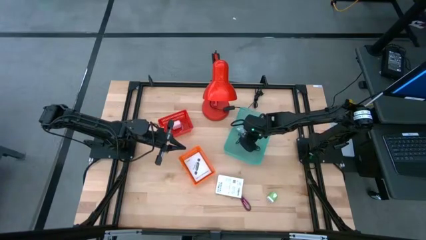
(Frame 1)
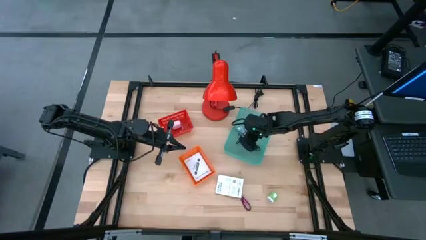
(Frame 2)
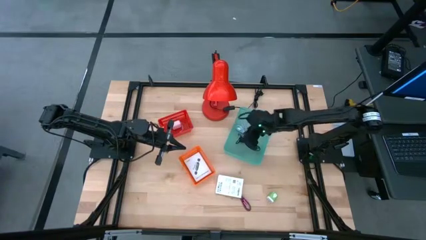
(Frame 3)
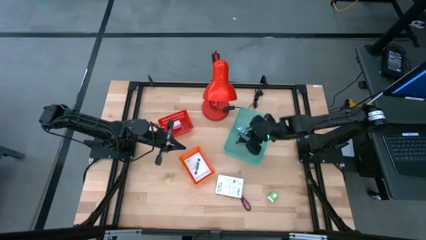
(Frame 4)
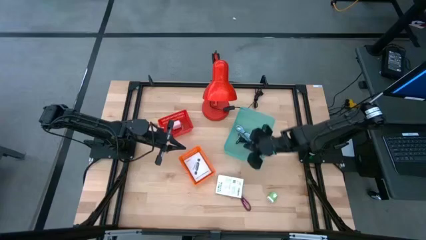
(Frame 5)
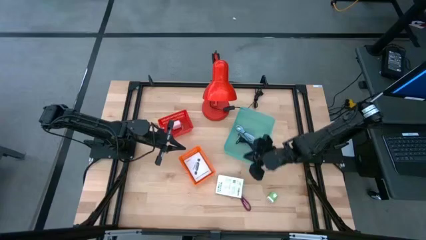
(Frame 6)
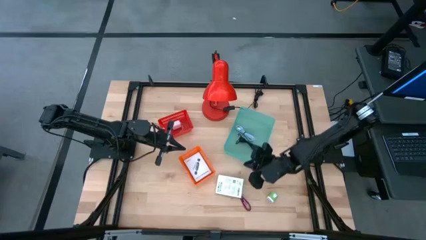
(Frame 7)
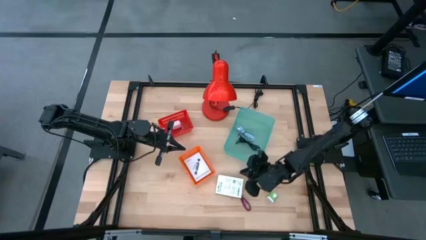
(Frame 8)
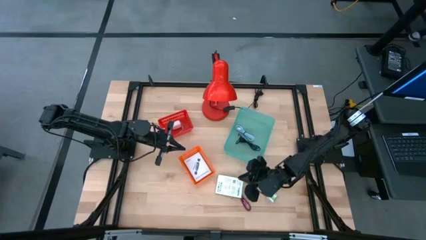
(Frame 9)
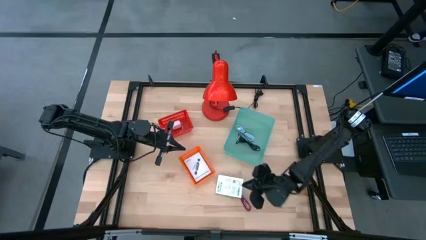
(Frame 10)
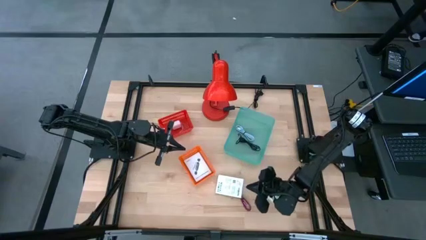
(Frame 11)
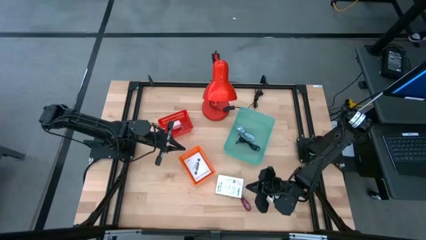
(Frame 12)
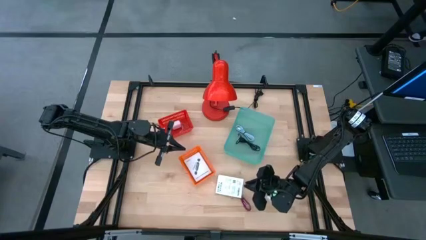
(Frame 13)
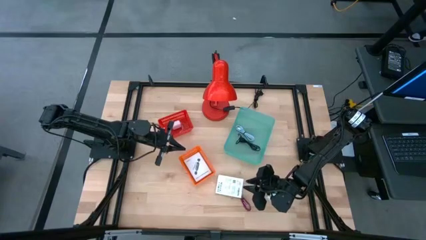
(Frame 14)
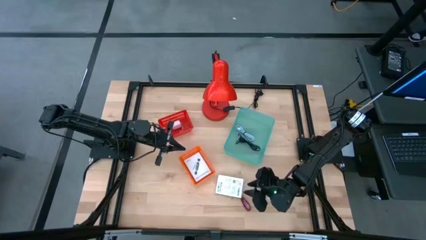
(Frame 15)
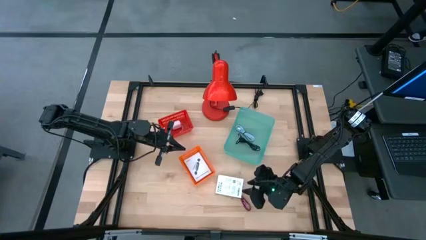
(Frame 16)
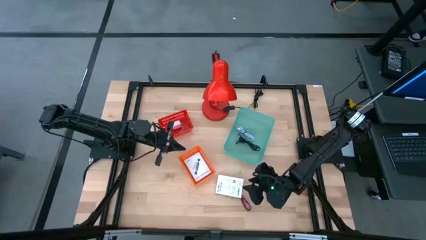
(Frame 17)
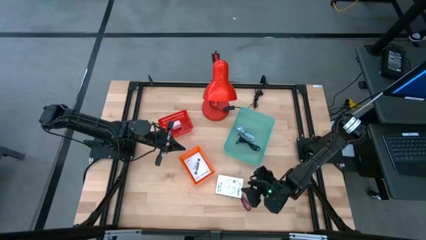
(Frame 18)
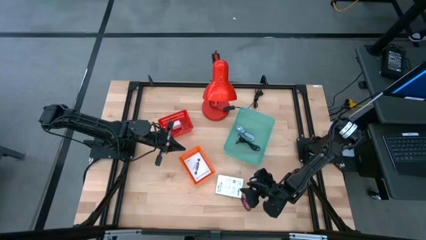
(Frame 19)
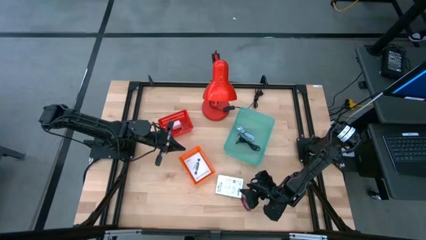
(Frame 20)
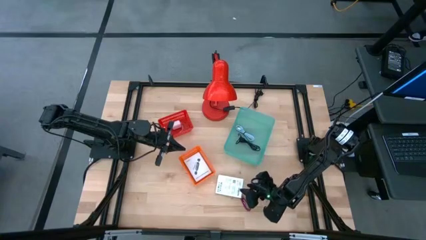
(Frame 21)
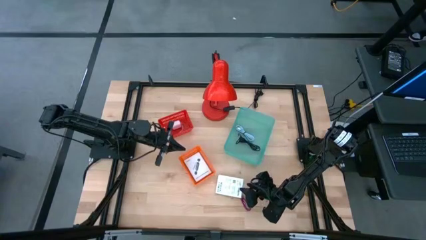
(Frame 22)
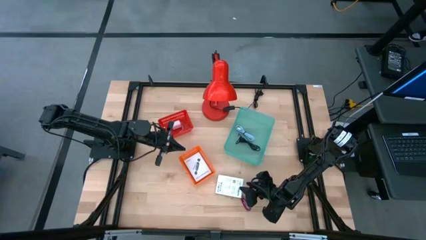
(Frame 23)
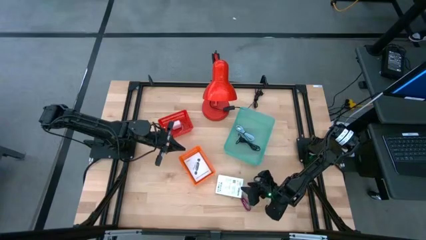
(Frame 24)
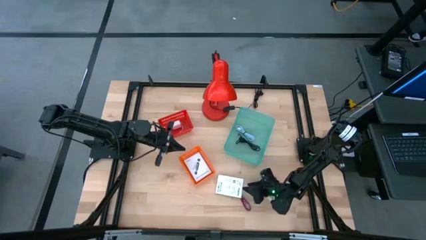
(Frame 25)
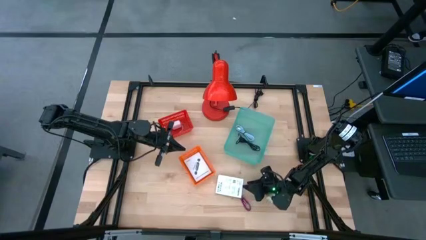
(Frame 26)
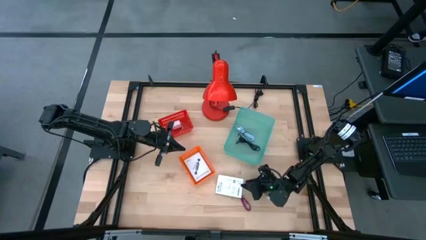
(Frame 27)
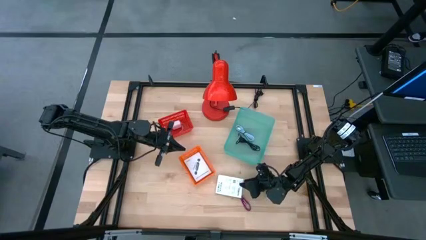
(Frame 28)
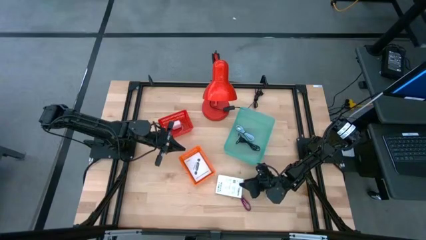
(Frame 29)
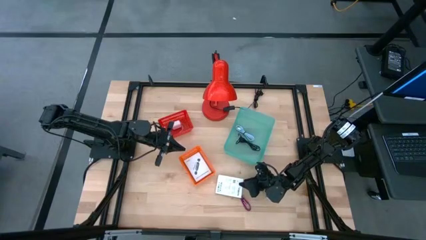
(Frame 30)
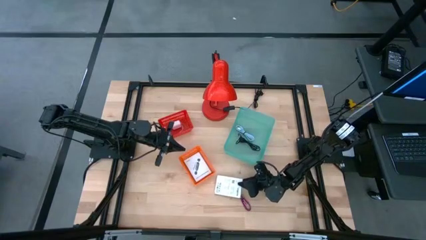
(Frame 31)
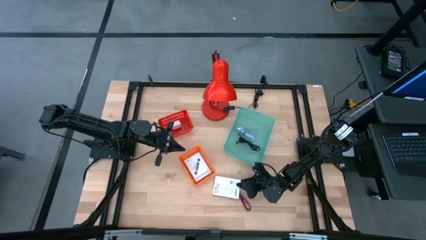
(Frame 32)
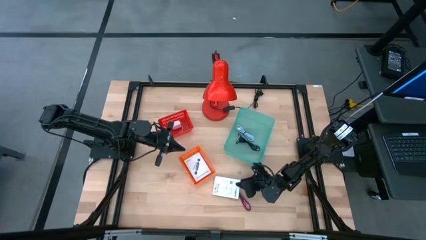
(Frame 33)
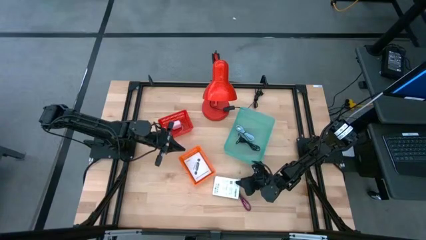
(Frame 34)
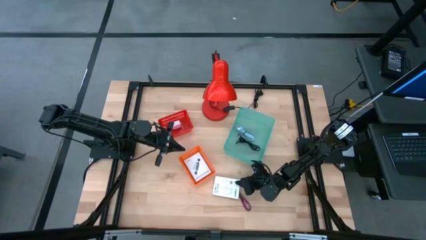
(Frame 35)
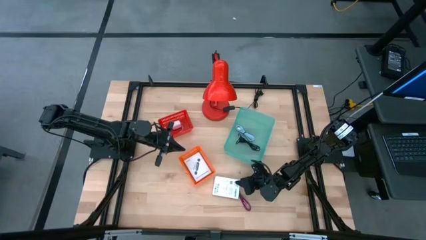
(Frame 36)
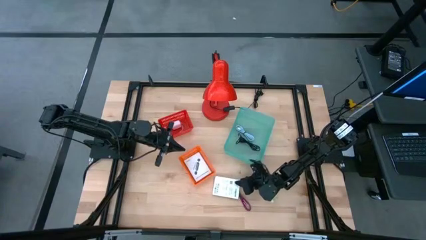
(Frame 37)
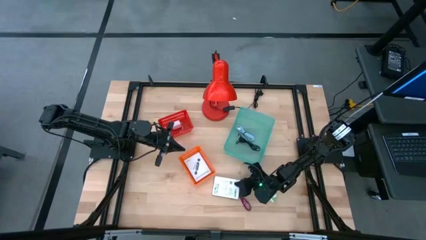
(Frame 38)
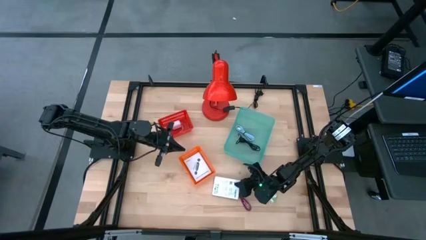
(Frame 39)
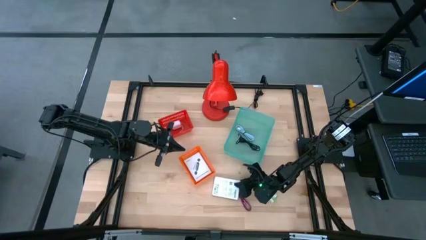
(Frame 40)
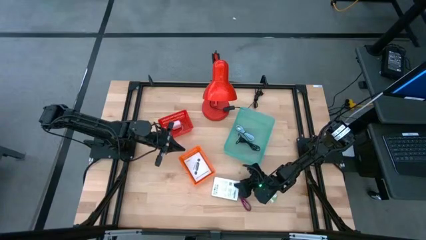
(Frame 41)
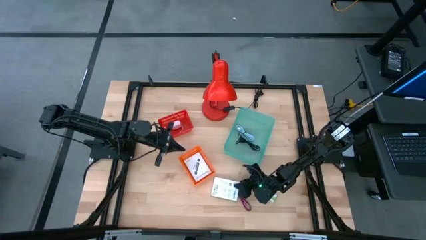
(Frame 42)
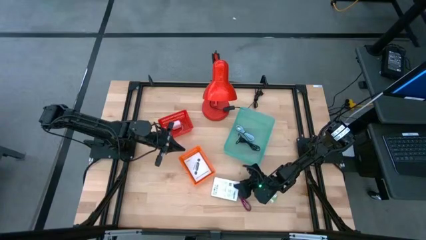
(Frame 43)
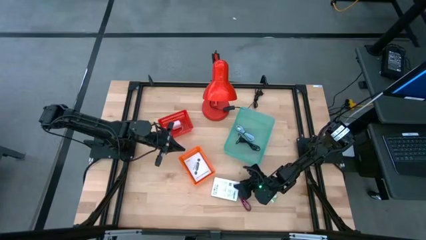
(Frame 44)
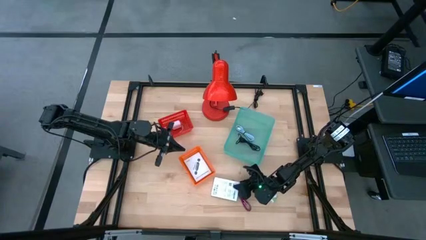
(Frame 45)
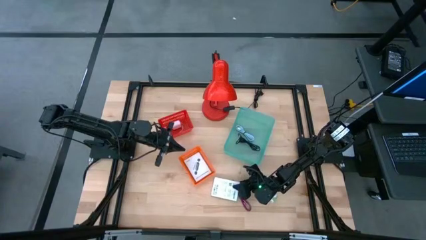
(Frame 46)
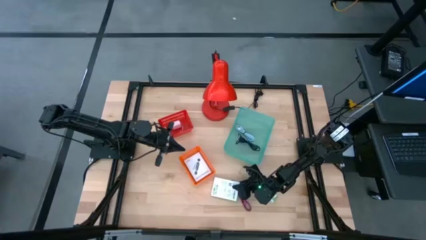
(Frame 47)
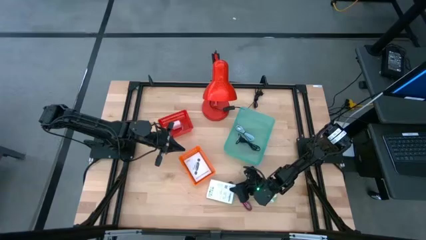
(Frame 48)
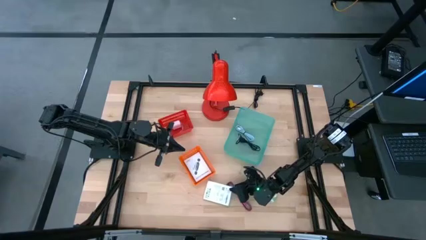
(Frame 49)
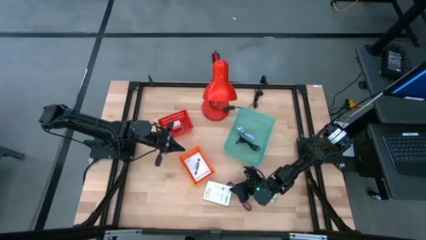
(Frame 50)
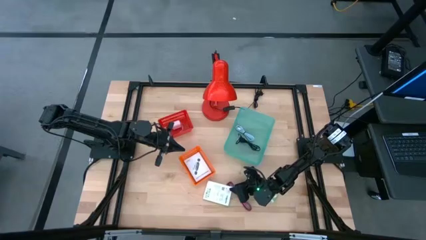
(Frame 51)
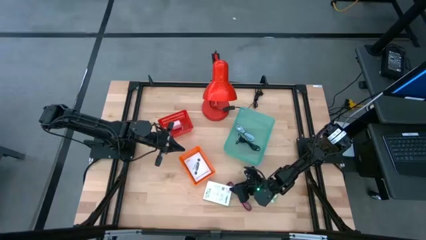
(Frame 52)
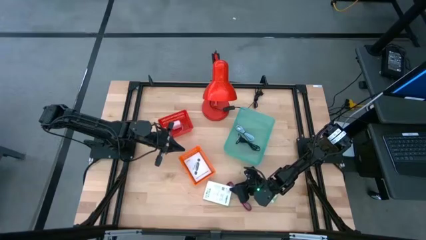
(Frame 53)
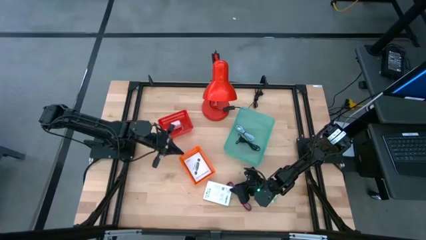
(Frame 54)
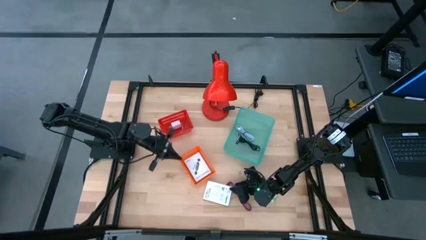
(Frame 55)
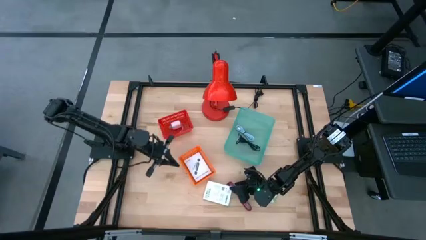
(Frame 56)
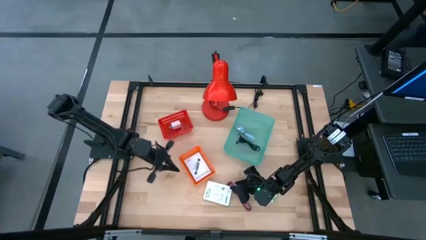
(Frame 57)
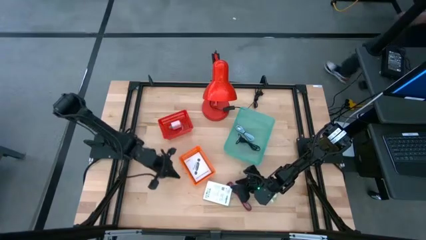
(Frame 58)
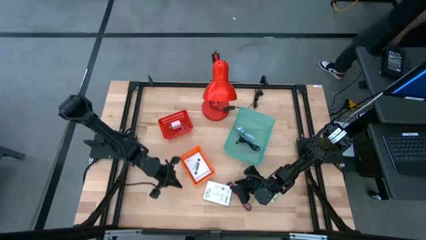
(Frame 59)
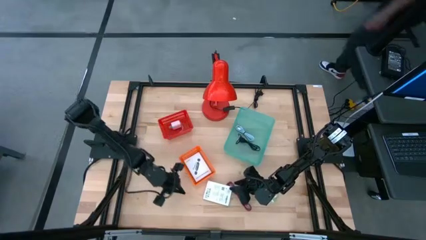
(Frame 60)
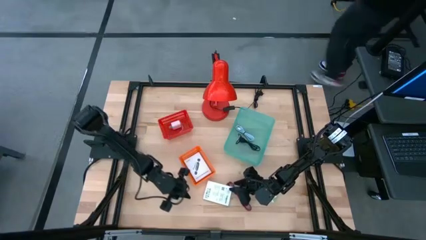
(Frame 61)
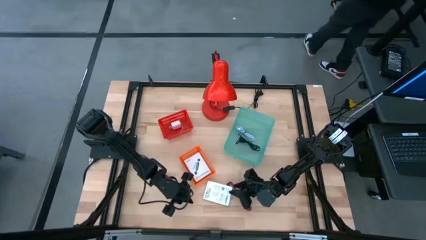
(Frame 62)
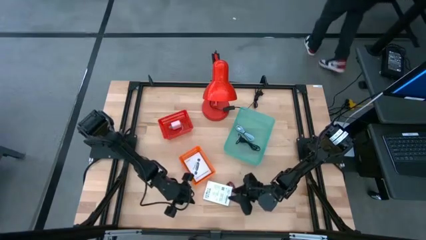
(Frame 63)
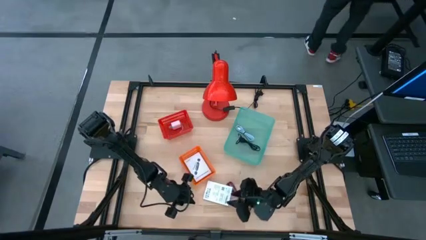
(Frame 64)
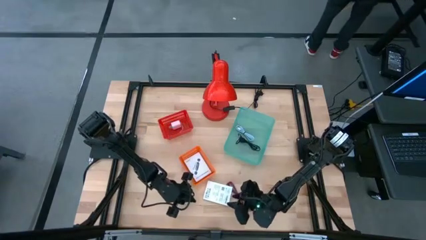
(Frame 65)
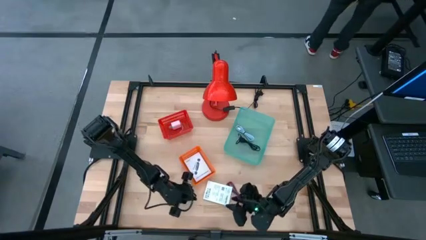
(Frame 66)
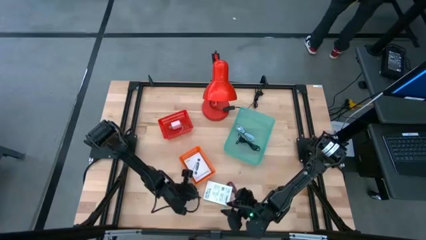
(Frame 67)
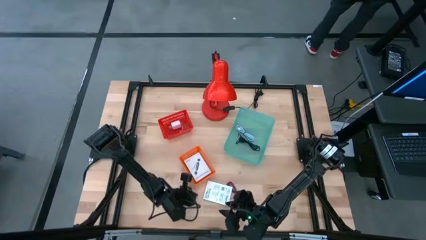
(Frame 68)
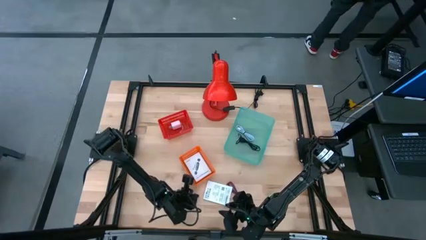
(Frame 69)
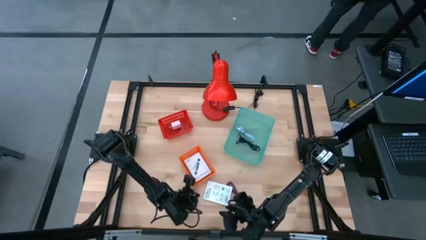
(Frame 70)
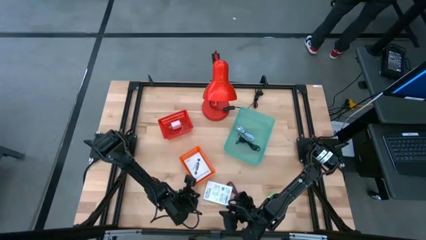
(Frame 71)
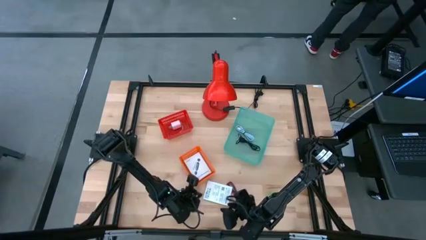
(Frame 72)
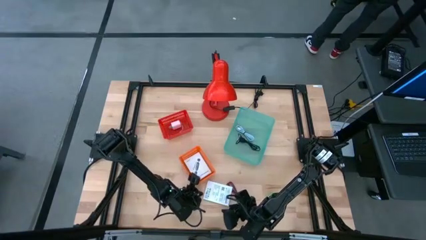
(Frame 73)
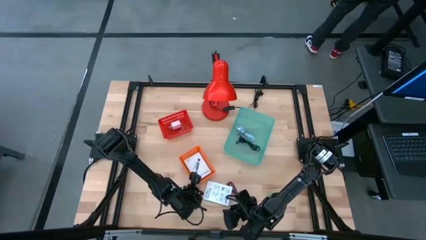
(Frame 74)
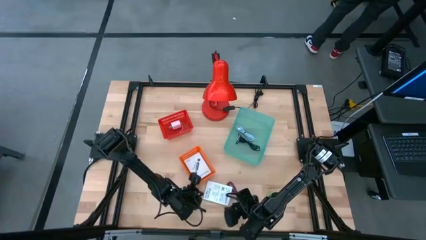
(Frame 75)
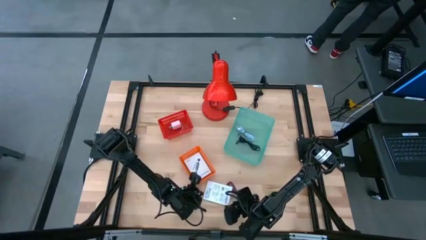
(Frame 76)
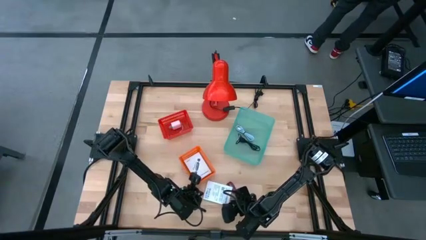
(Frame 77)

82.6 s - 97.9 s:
Task: Pick and place items into bin
Put the white card reader box into the orange bin

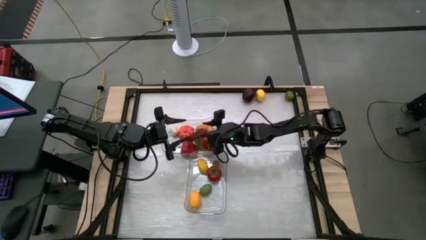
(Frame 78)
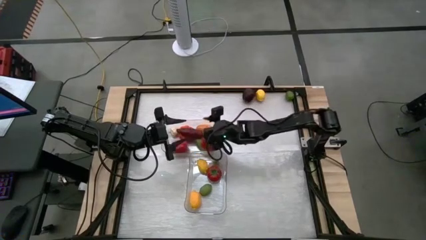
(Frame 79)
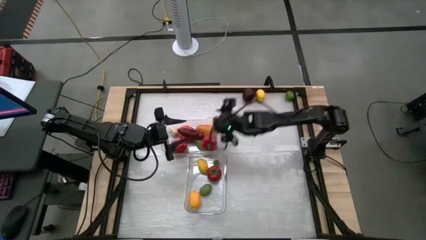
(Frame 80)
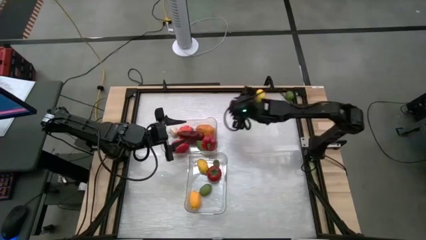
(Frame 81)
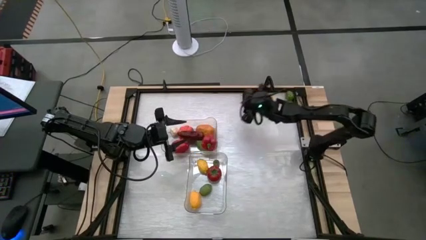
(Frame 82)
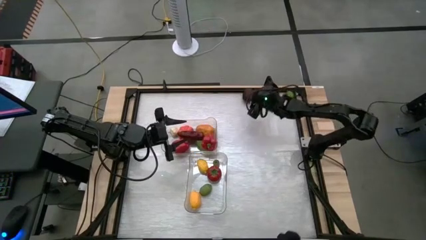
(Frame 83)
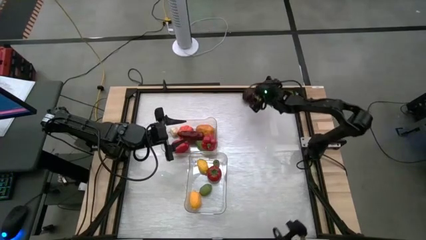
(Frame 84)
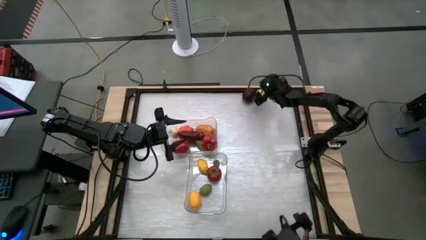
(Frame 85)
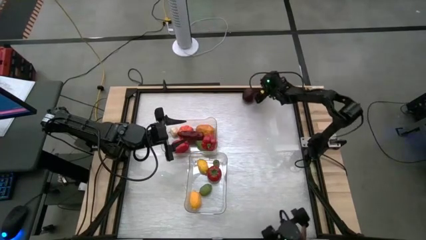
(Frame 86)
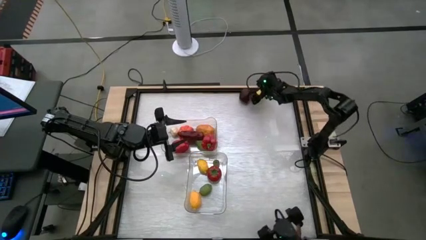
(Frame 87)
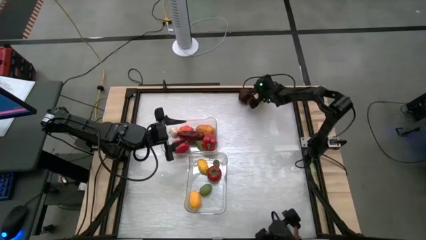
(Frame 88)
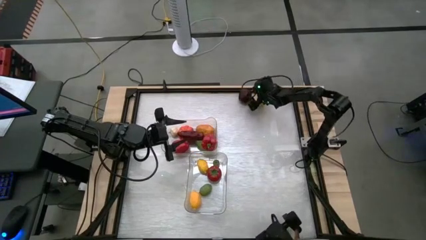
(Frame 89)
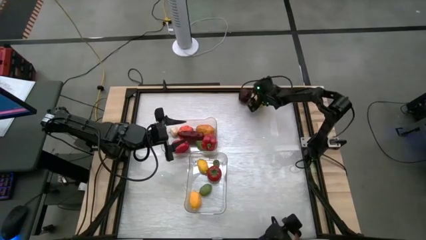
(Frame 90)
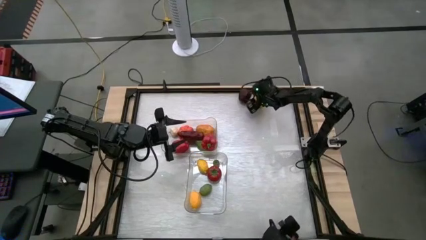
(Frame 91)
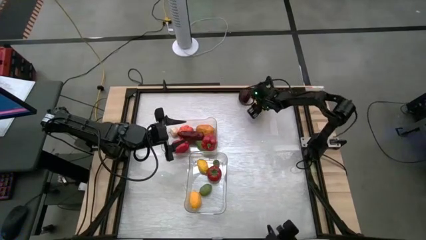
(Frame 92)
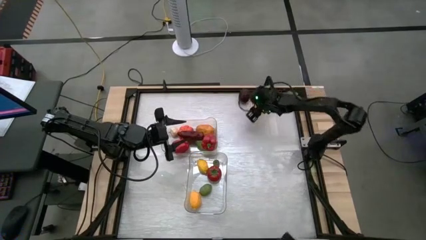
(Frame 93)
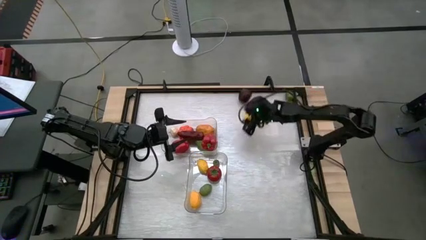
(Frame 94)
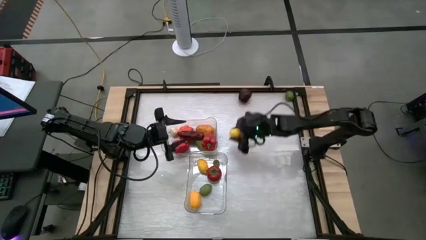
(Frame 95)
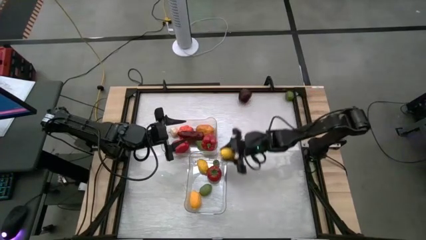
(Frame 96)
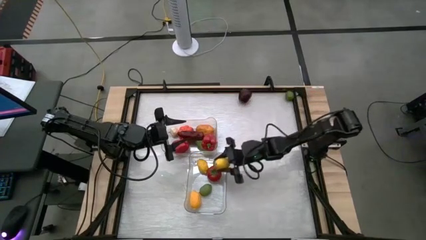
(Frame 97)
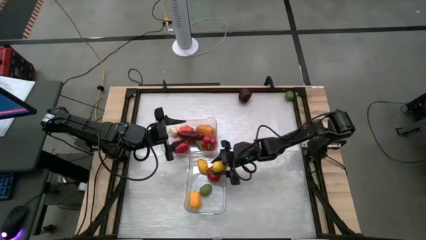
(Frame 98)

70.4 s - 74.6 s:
Task: Sort produce into baskets
Put the lemon into the bottom transparent bin
